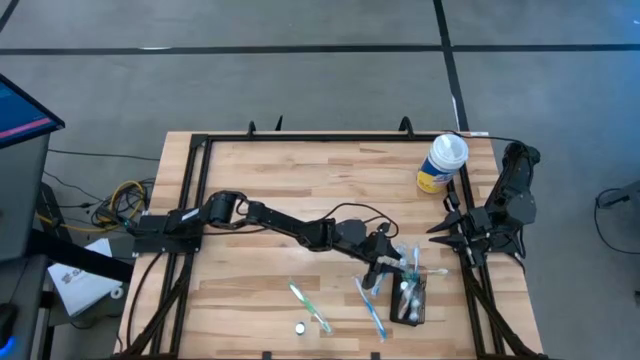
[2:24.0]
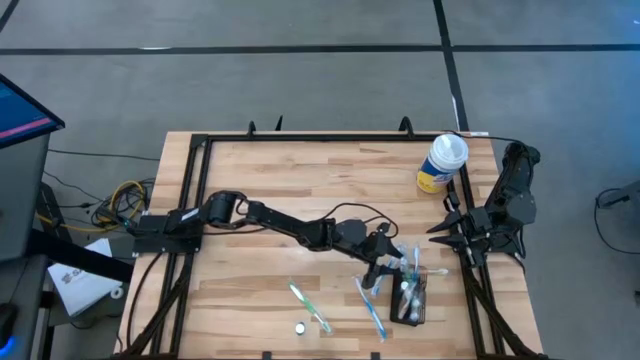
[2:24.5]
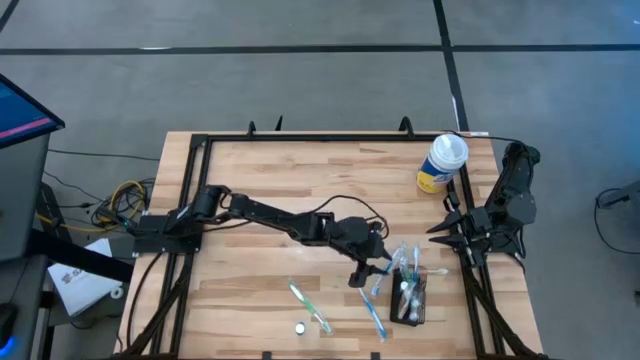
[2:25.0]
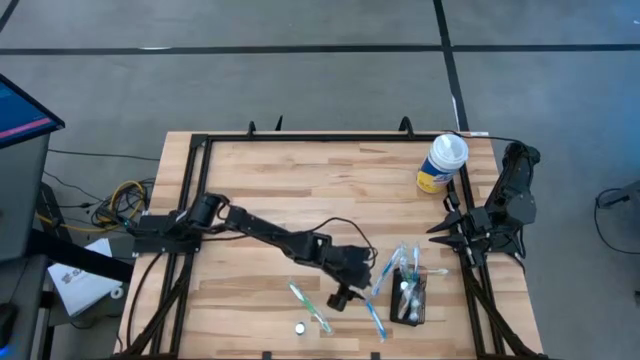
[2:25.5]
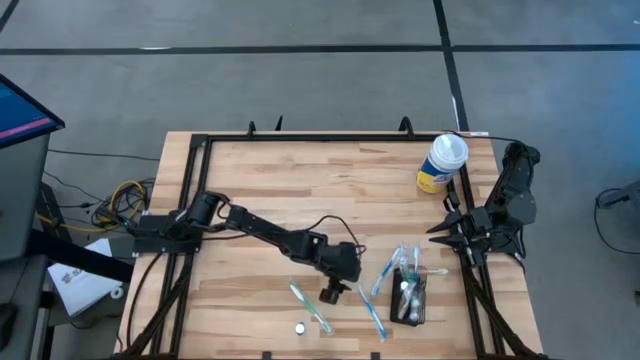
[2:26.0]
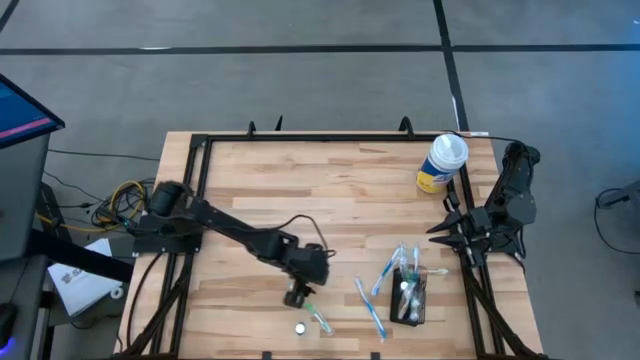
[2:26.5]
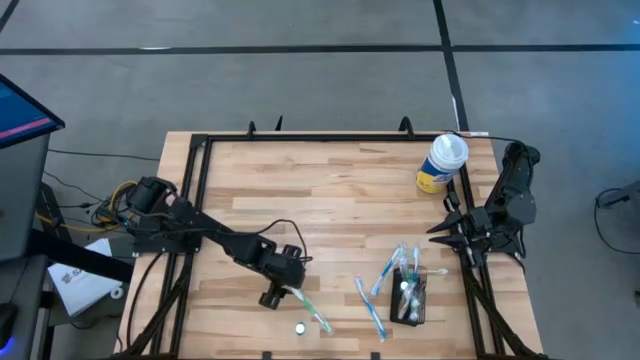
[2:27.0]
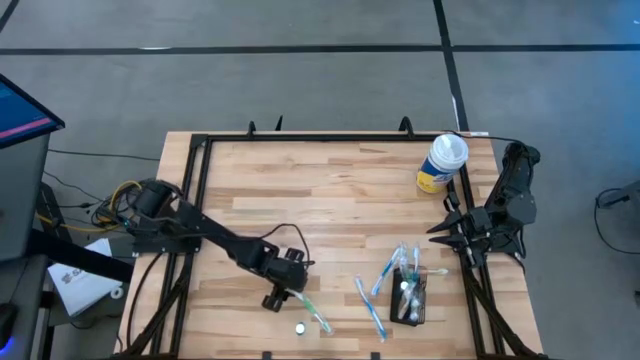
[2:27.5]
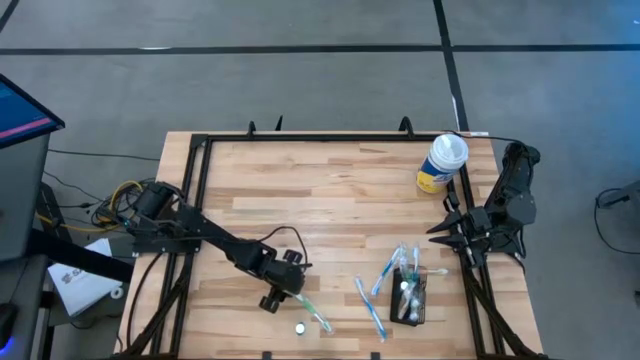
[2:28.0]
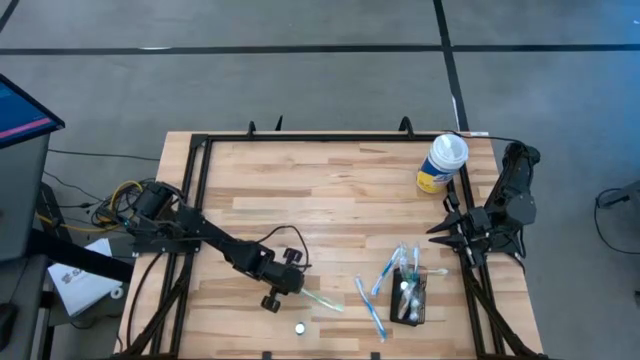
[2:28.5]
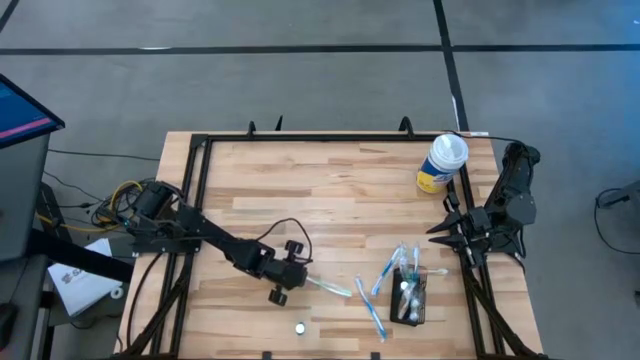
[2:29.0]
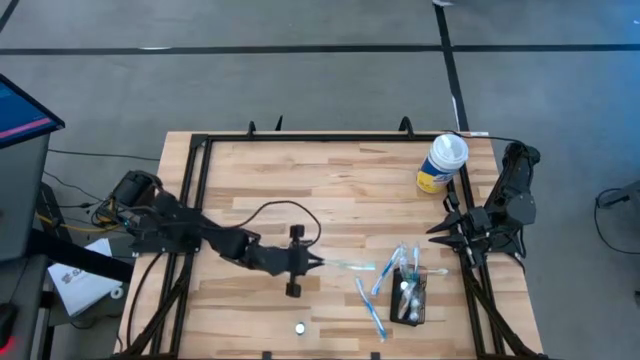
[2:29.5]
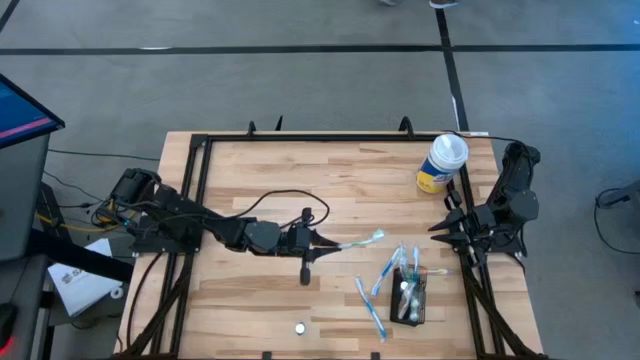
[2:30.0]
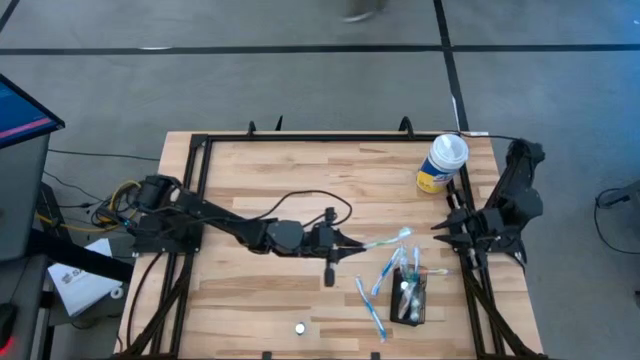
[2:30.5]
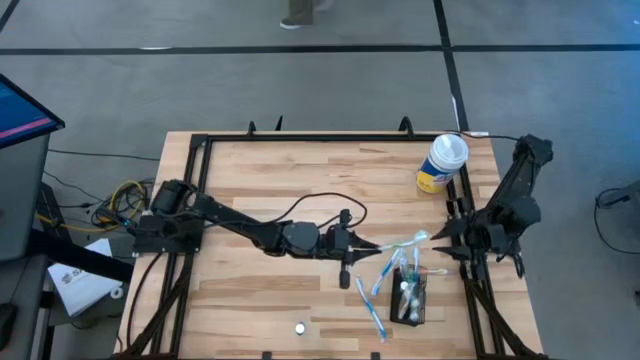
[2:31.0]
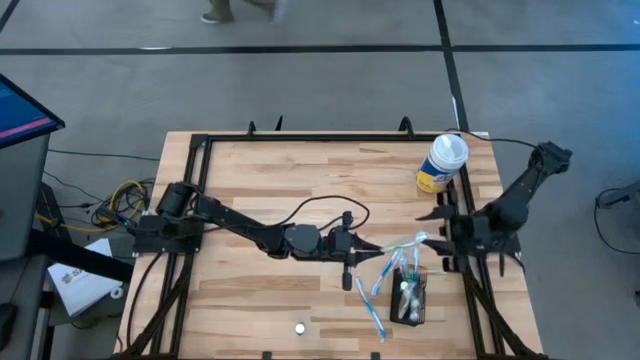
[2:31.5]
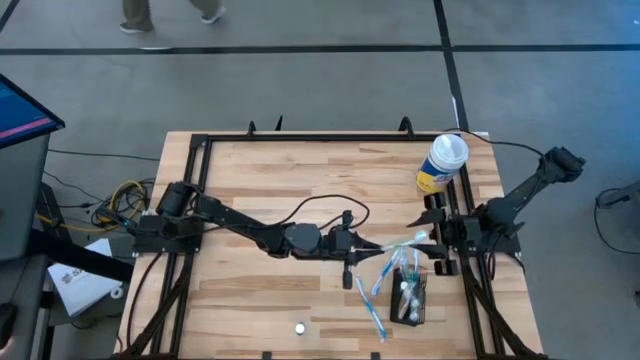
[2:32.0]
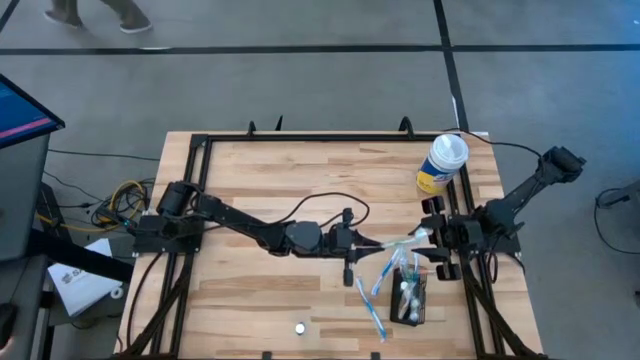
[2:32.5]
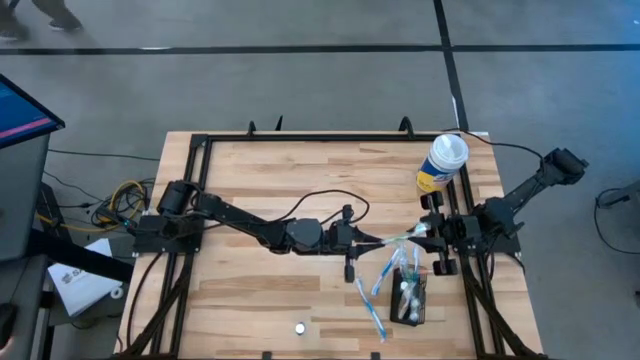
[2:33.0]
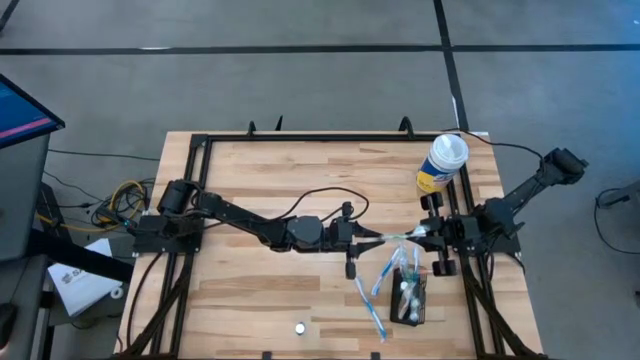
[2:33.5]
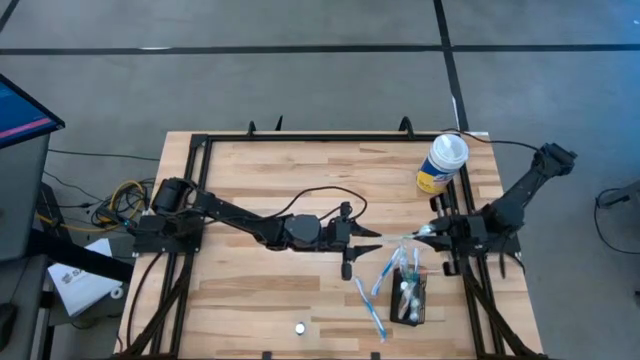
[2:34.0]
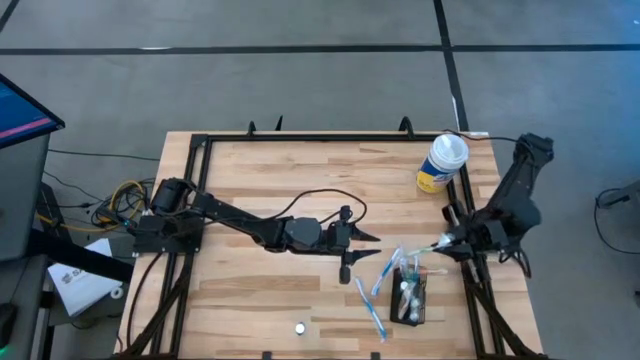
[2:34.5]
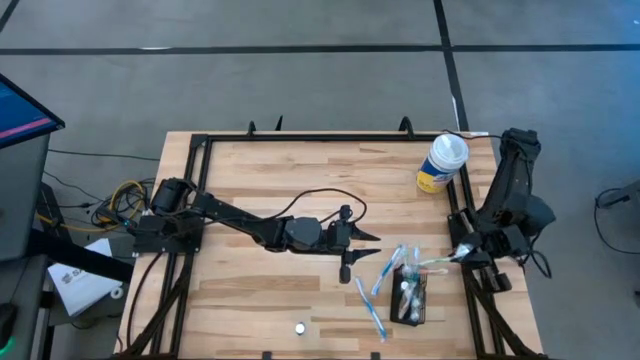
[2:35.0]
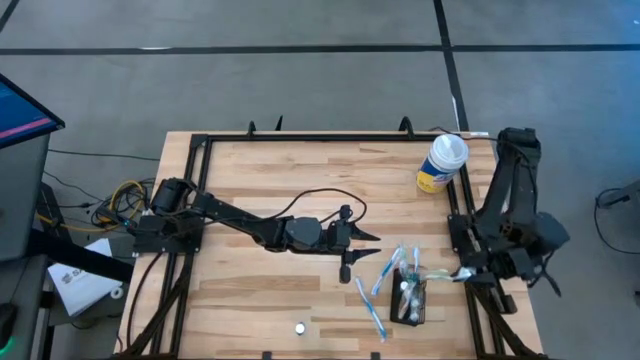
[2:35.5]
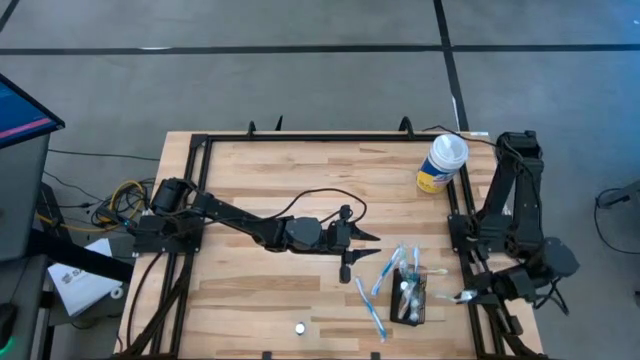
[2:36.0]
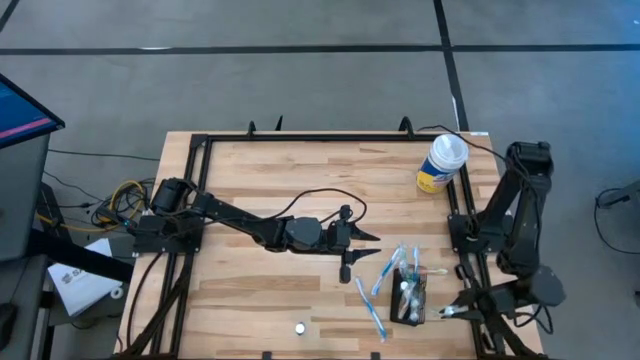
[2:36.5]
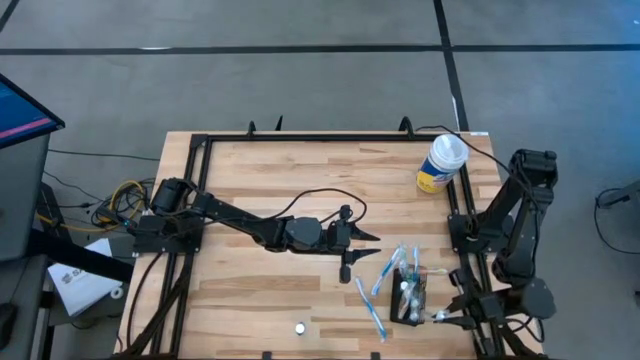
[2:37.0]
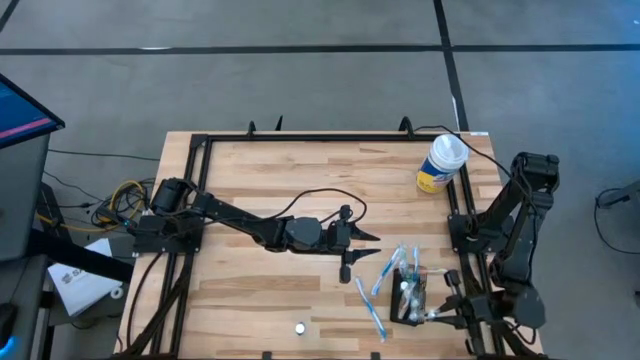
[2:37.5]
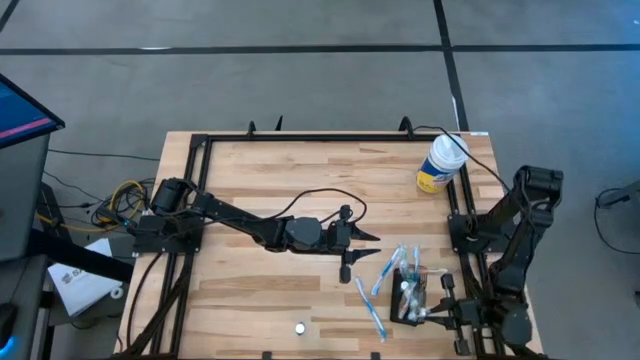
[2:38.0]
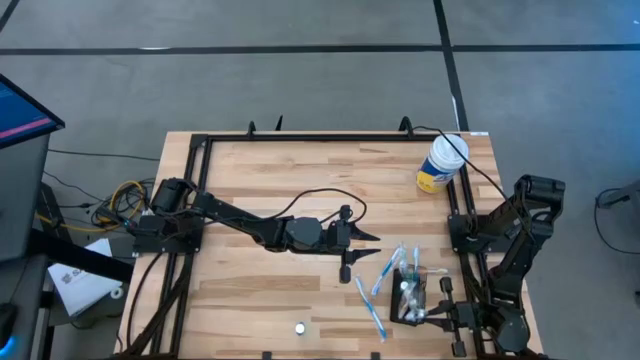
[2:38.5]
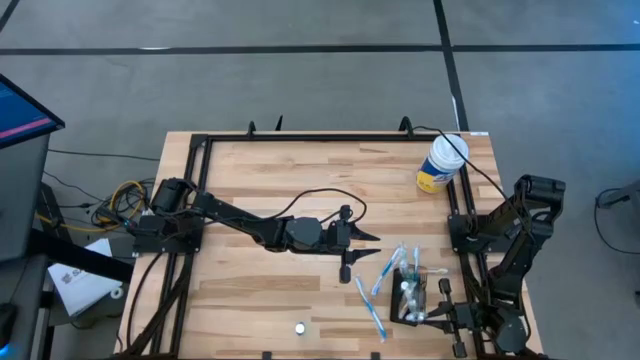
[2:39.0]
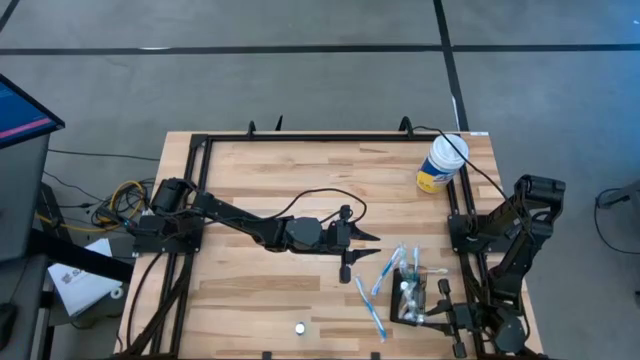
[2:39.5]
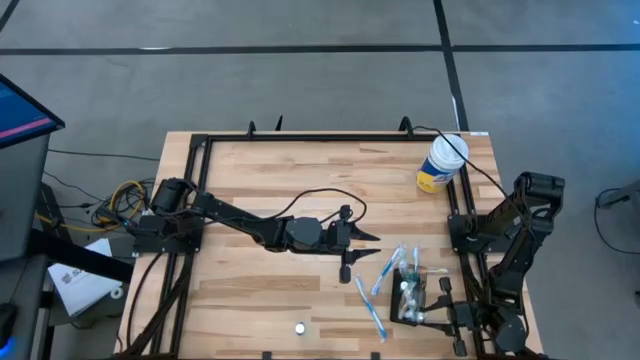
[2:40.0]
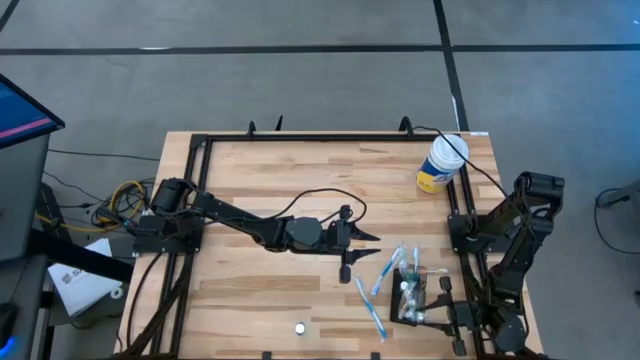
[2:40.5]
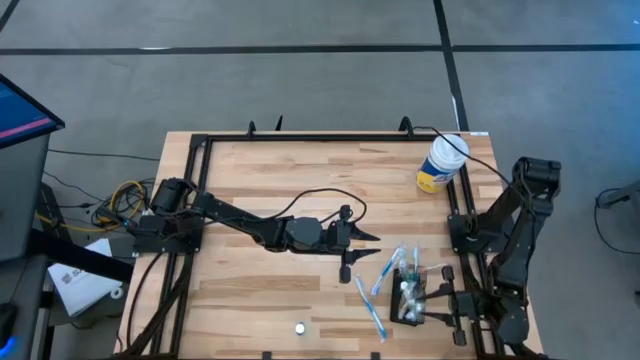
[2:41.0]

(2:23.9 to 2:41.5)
Task: Pick & Place toothbrushing station
Put the green toothbrush into the black wire organizer

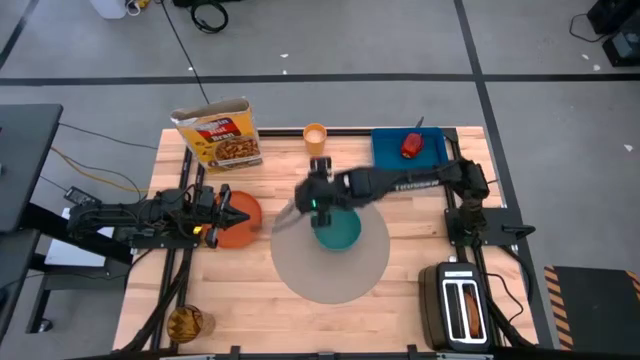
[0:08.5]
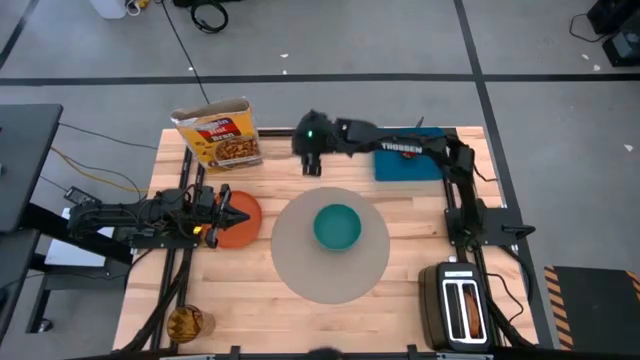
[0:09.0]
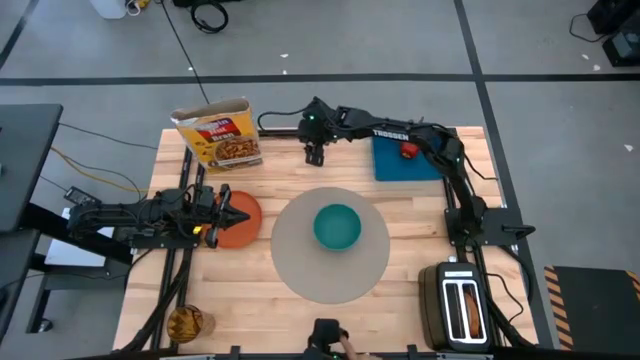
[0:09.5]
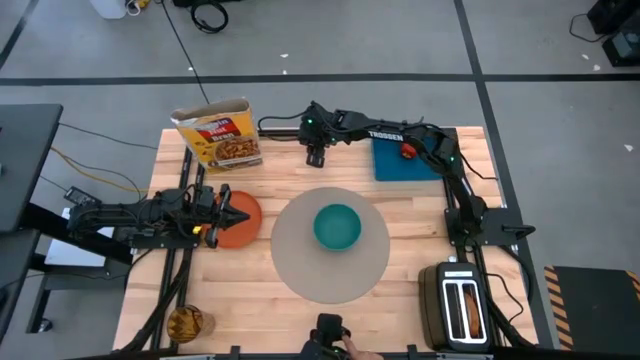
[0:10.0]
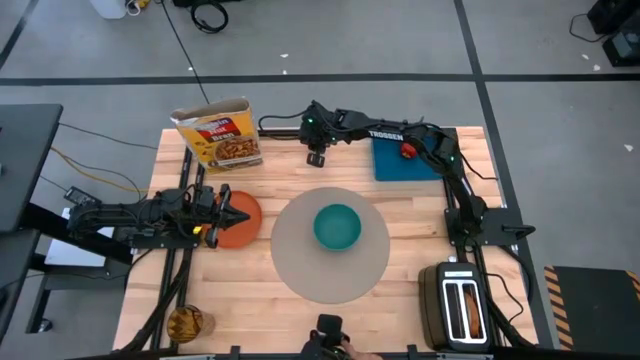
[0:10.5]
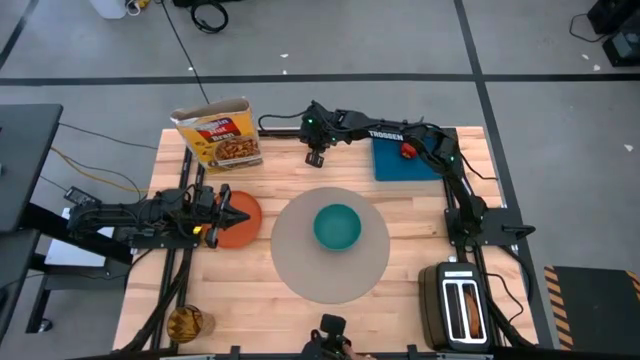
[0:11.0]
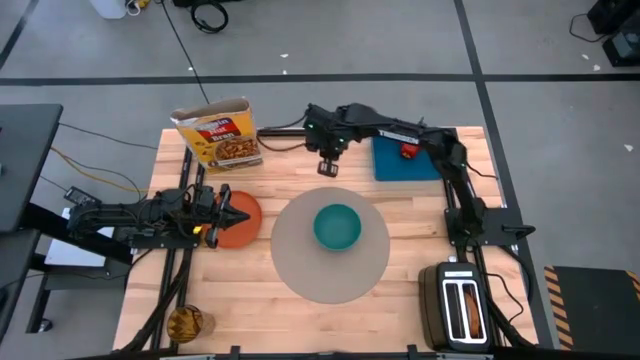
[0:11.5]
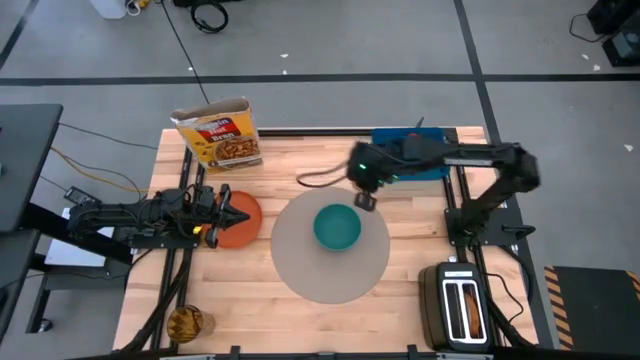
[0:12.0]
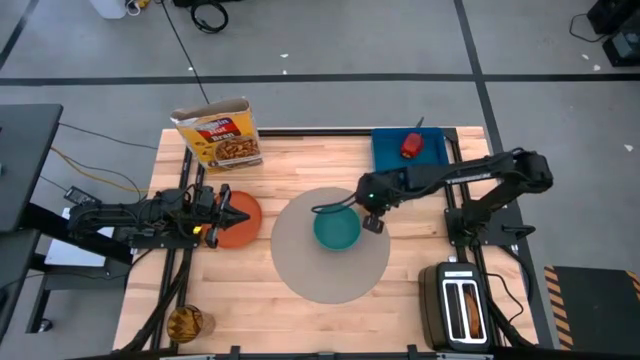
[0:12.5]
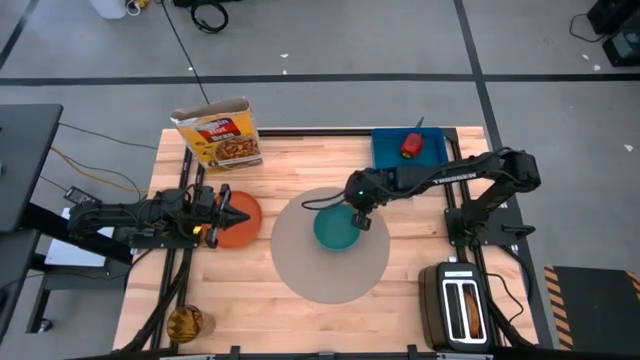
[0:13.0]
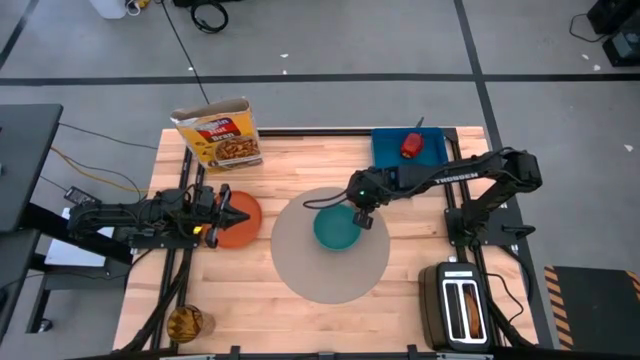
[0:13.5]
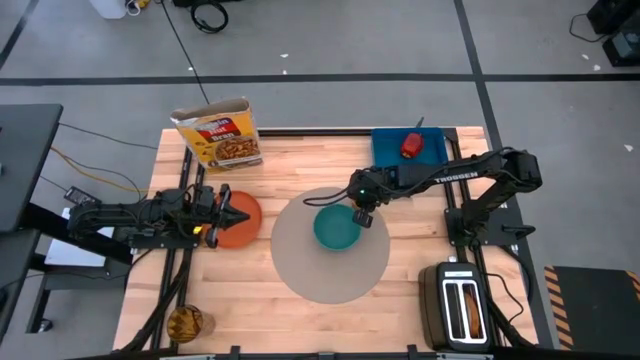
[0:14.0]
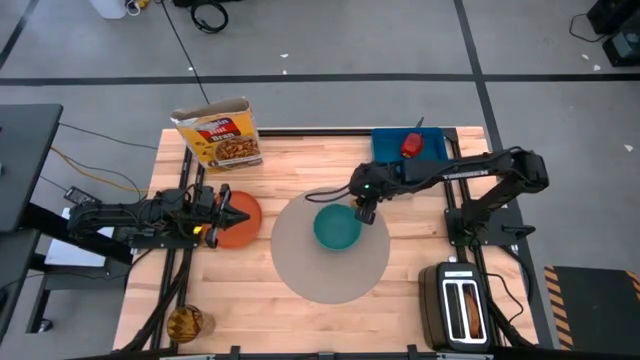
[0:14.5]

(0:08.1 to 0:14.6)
Task: Arrange a breakfast setting
Put the yellow cup on the mat to the top right of the bowl
